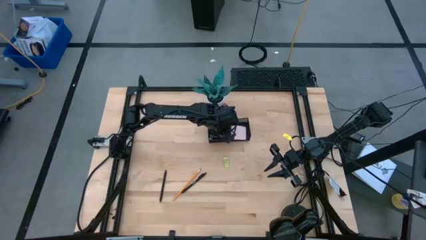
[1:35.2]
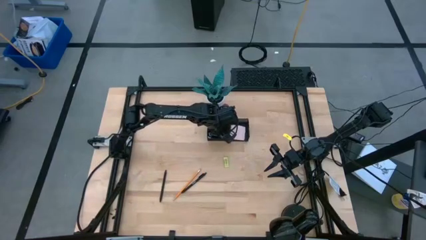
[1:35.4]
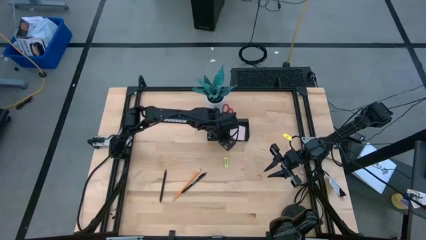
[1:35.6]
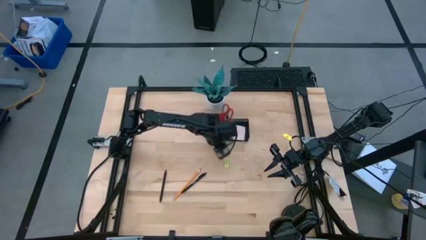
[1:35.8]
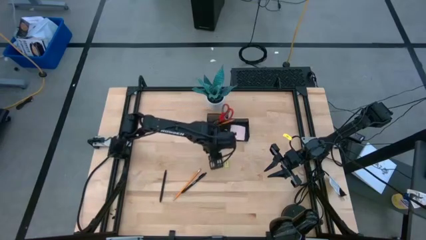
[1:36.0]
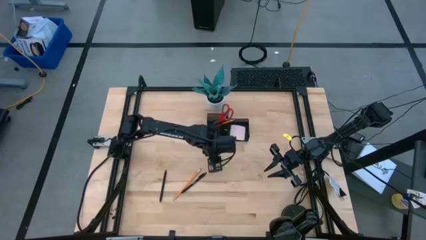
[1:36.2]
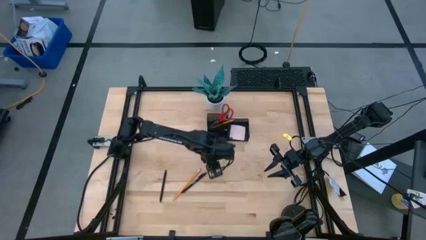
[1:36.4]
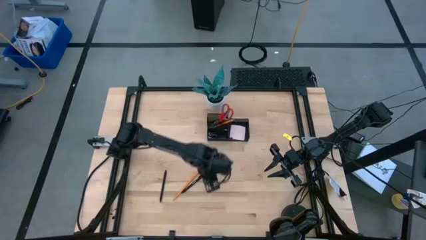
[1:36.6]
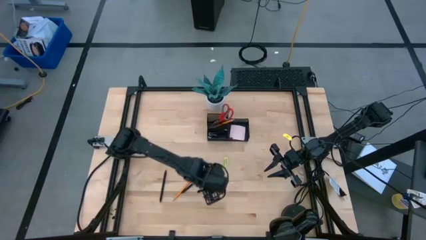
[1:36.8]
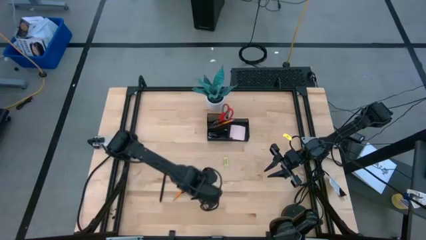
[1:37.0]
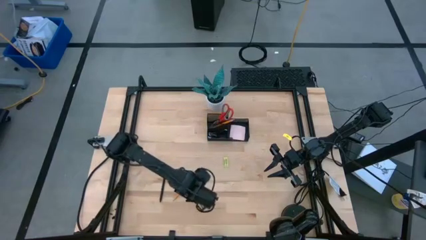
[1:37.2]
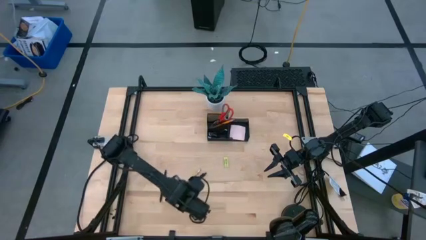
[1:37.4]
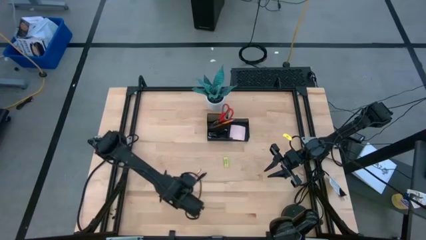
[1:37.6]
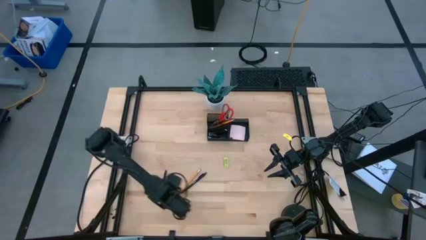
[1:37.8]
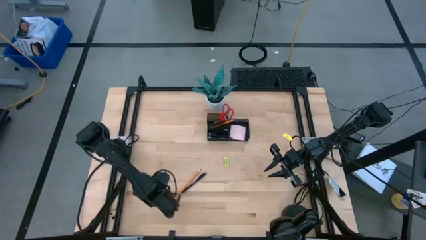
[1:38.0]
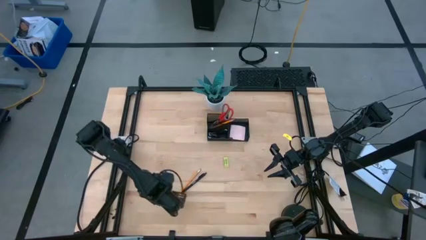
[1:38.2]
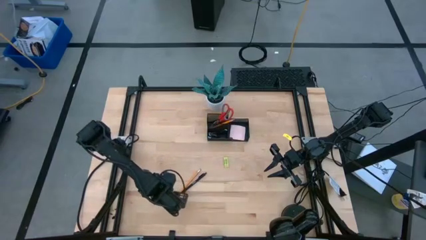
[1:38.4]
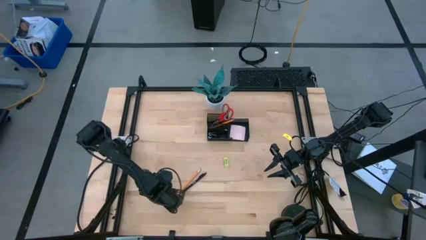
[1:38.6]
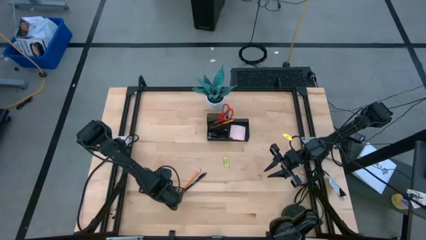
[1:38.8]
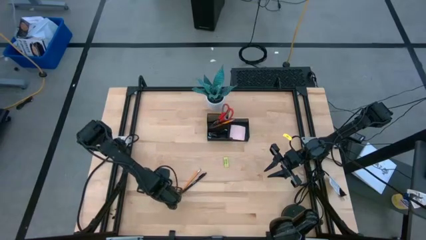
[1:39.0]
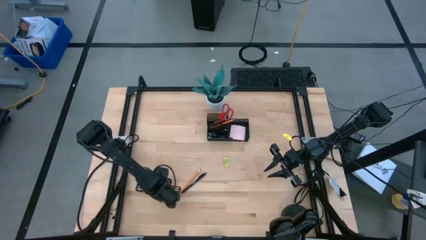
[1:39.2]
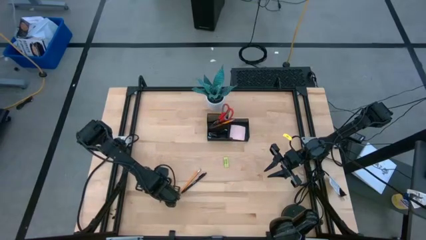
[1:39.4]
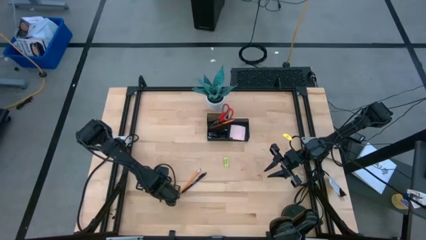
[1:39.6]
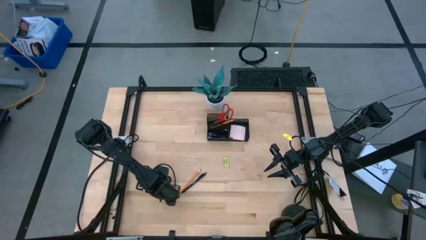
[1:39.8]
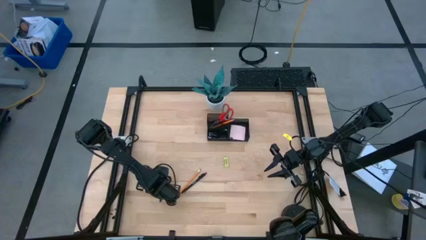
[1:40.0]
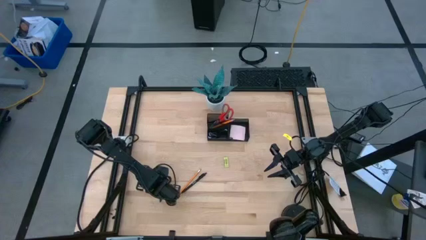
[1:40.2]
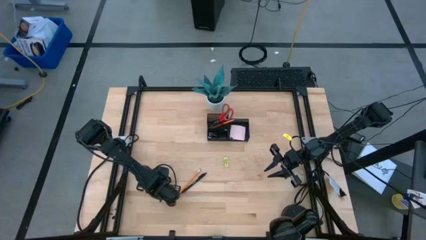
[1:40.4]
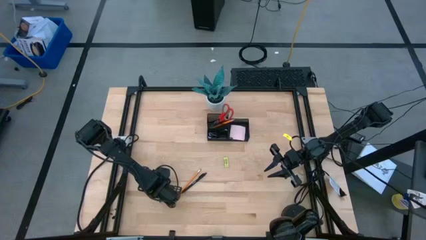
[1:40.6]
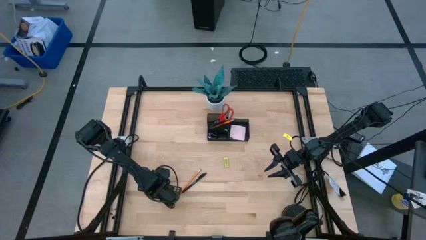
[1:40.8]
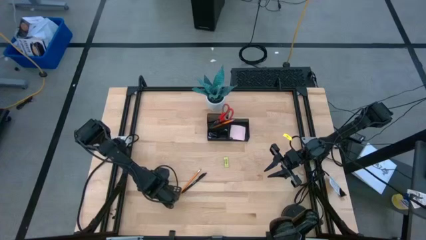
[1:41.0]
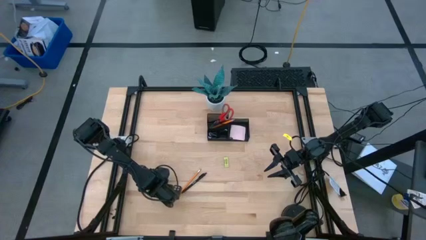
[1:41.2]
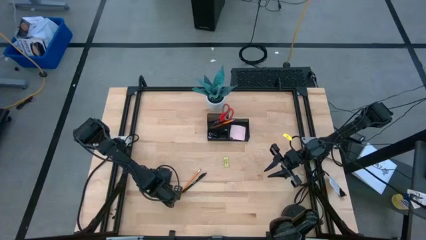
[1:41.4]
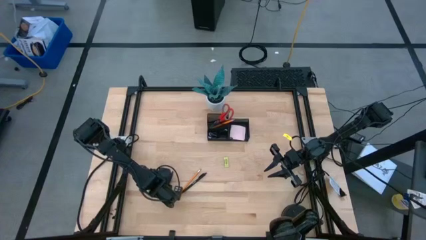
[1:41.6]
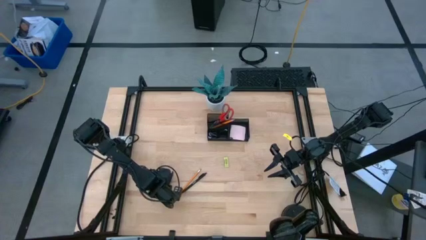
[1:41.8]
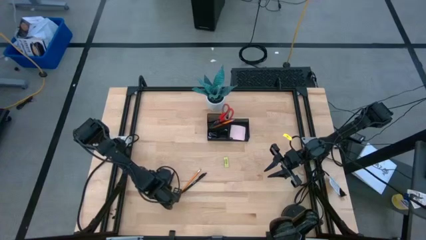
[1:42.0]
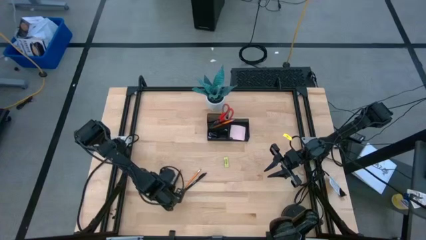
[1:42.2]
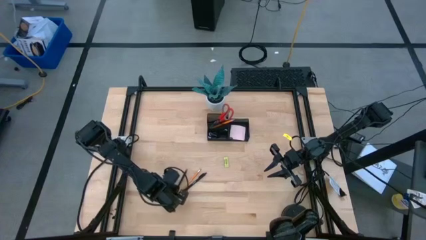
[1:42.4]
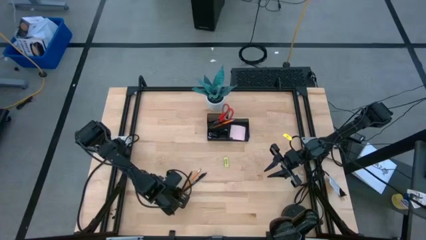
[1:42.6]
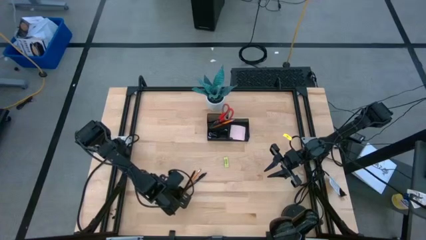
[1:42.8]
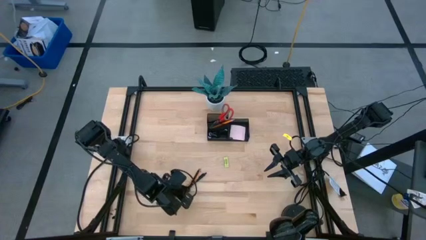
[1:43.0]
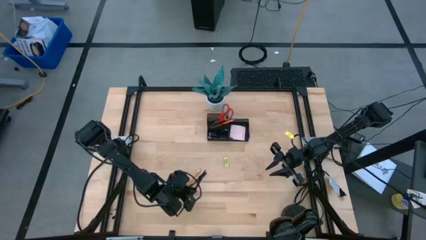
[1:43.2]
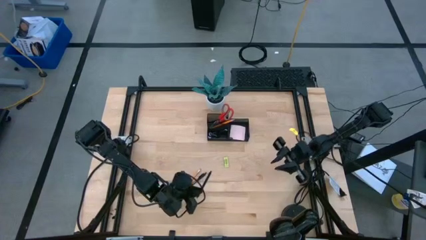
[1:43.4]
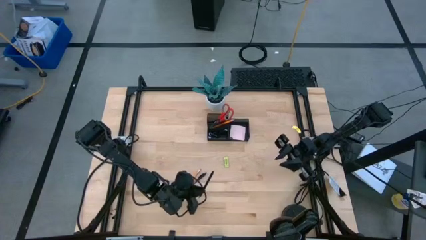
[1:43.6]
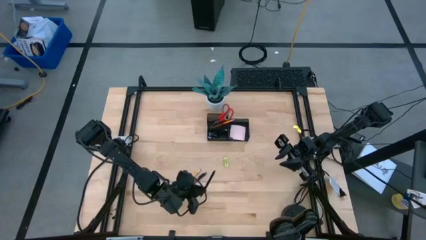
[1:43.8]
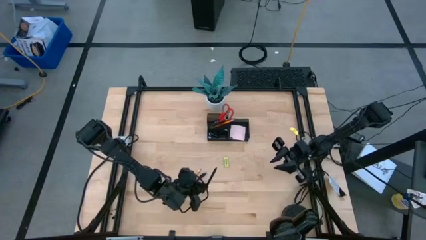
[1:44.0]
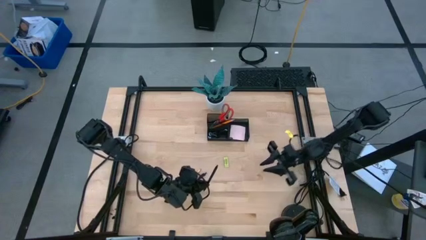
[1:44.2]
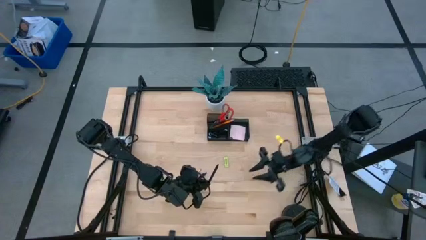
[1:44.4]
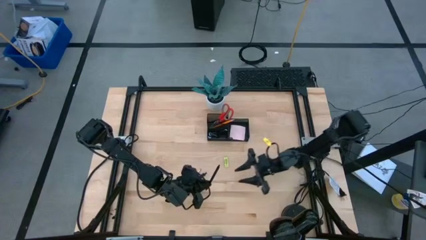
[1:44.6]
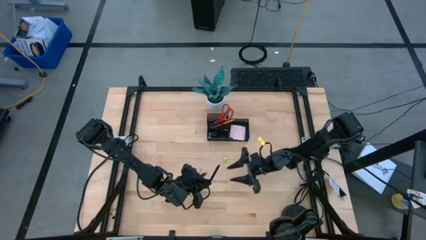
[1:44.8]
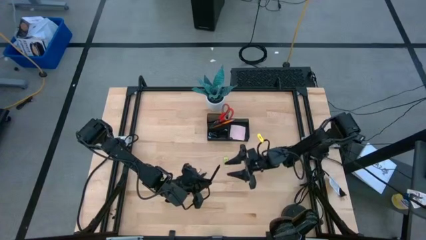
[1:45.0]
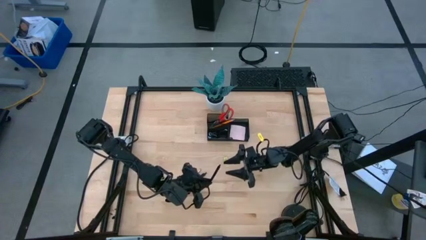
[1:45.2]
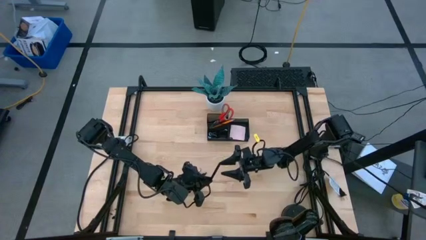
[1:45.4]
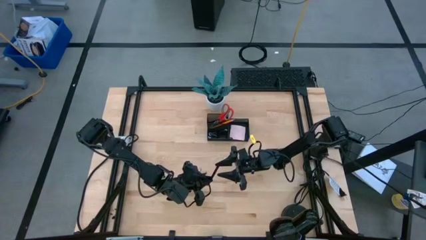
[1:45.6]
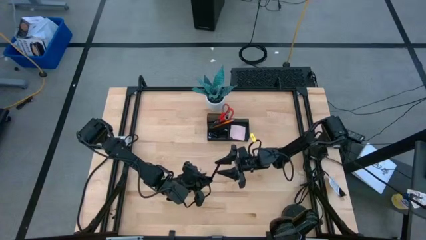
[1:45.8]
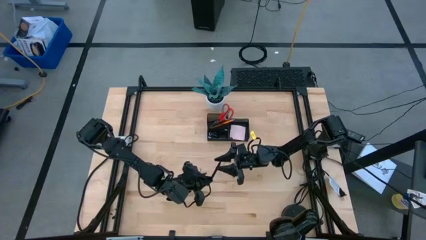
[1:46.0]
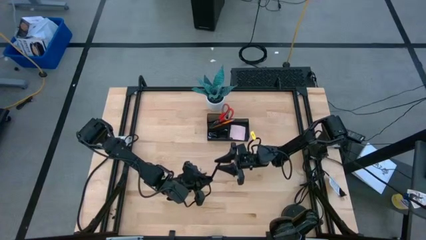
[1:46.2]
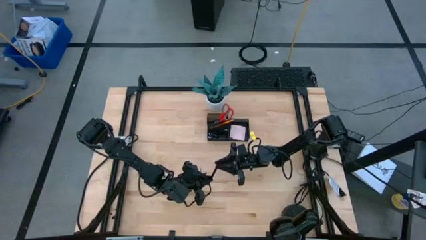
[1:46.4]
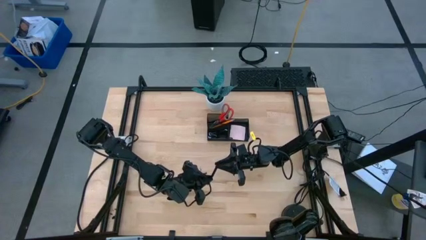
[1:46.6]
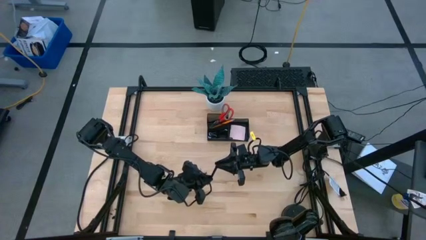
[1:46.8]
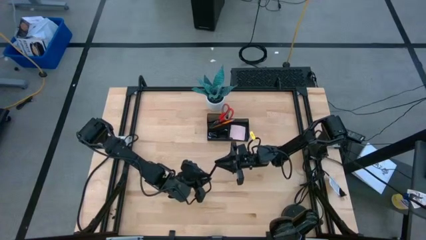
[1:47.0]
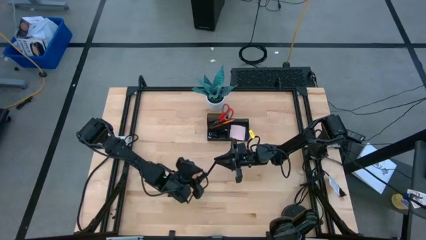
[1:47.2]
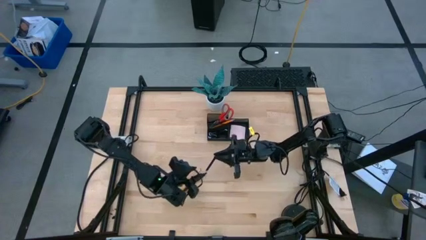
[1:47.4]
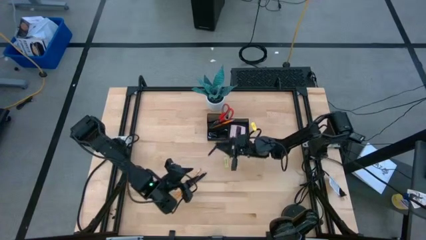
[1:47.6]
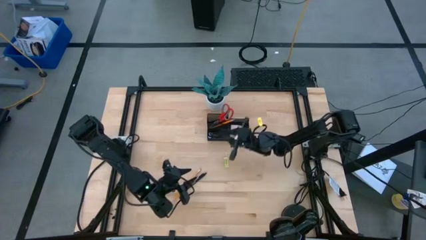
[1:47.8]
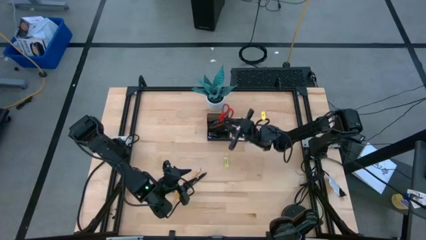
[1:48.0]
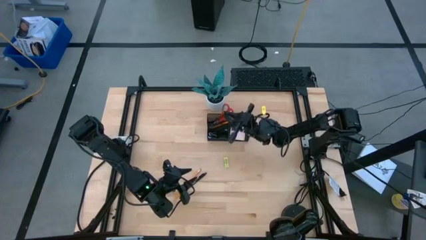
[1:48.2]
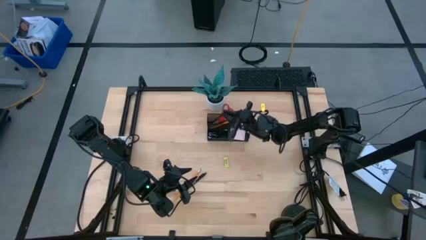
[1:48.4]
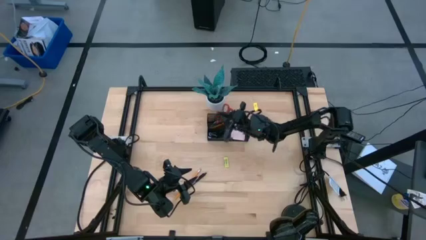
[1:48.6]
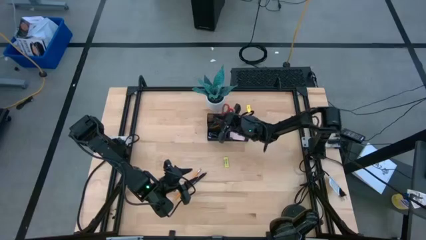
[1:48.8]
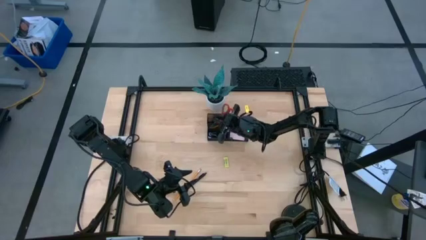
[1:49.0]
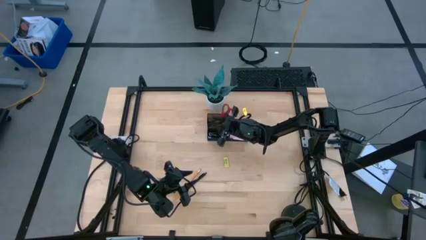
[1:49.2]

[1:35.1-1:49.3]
Task: Pick and place office supplies into organizer
Put the black pen into the black desk organizer

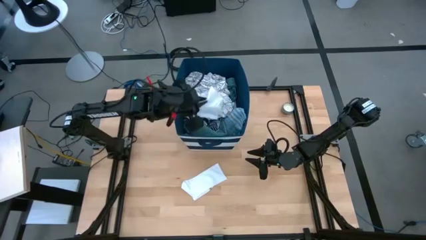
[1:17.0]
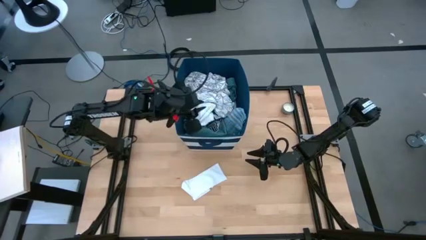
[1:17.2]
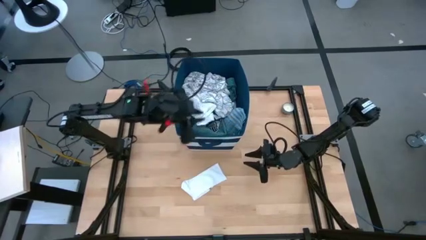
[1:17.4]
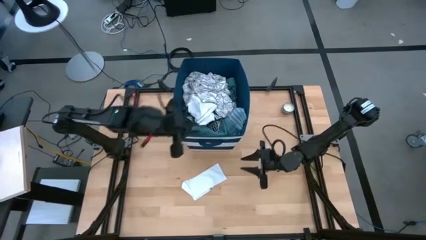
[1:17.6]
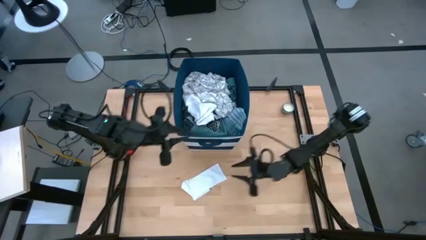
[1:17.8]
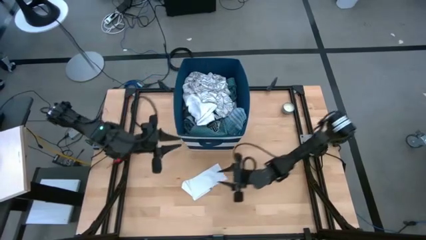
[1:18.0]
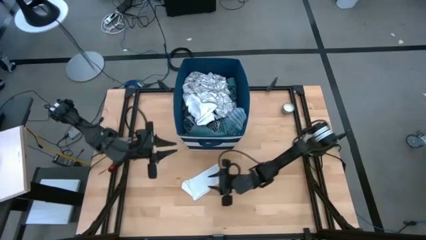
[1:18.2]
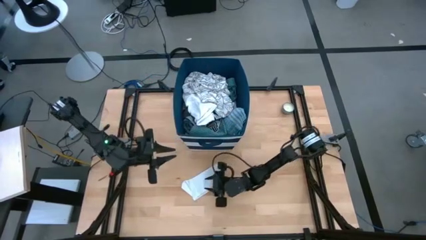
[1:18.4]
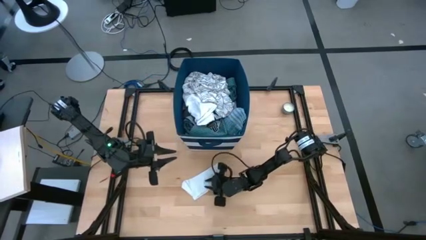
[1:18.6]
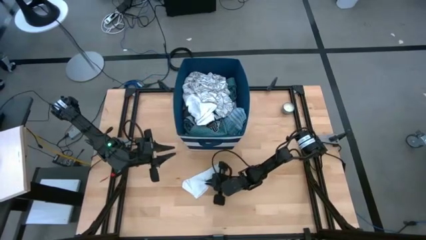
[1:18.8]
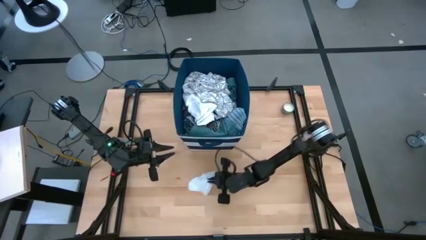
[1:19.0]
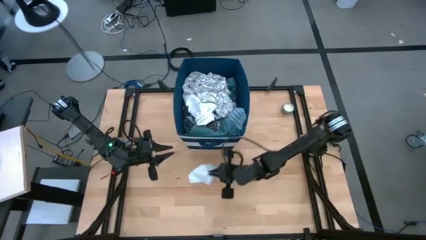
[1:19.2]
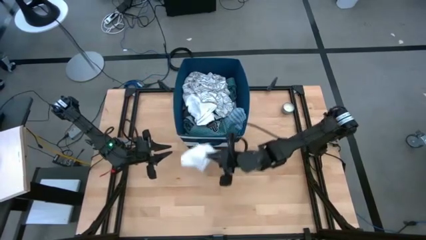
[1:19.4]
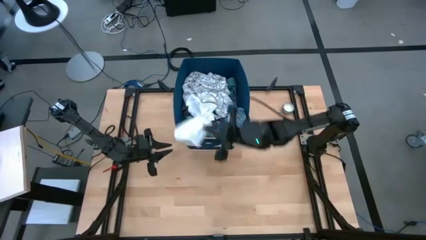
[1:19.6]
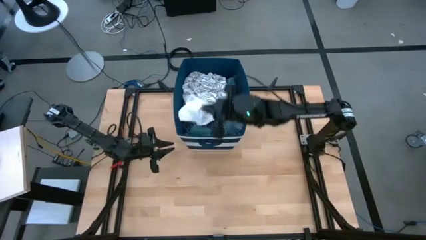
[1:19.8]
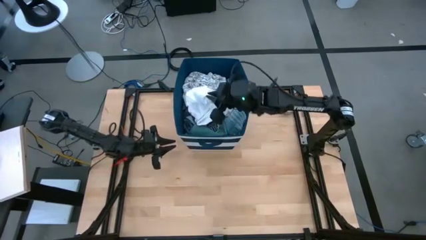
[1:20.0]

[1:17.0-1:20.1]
Task: Sort clothes
Put the white sock into the blue bin
